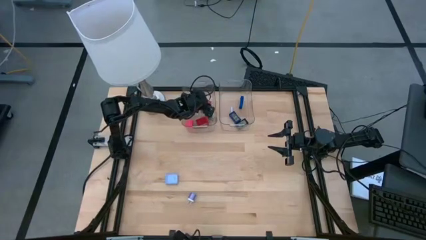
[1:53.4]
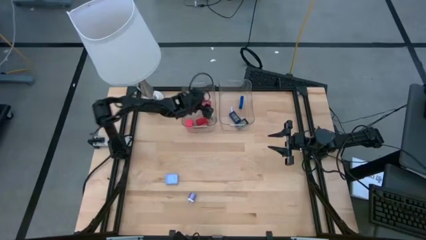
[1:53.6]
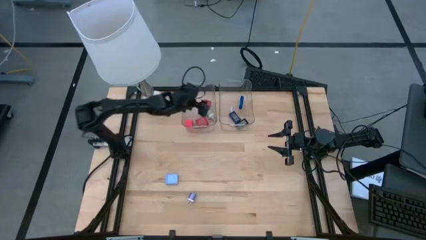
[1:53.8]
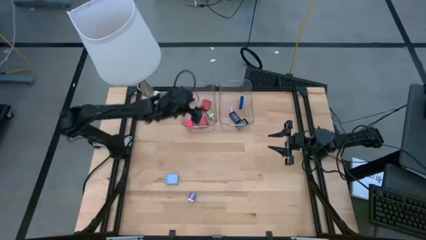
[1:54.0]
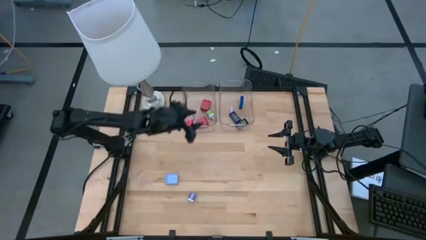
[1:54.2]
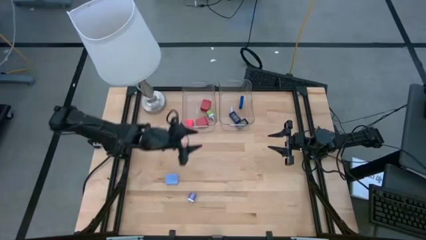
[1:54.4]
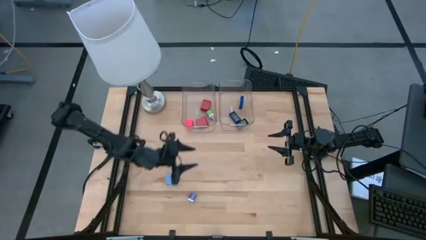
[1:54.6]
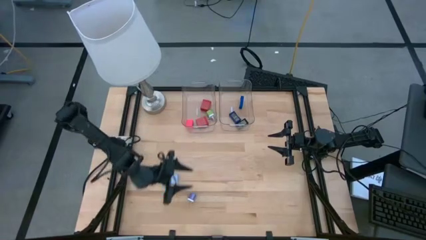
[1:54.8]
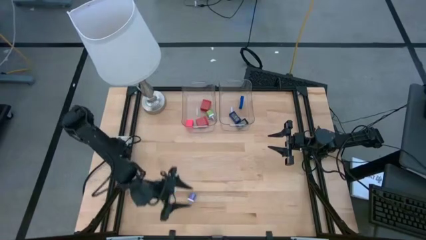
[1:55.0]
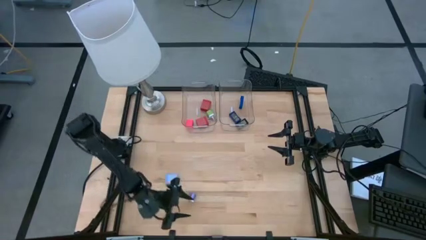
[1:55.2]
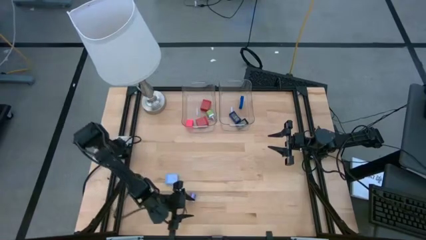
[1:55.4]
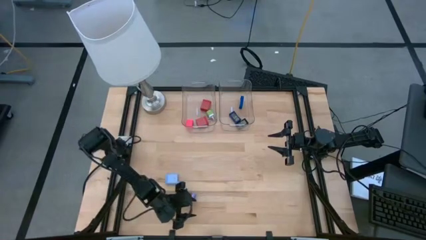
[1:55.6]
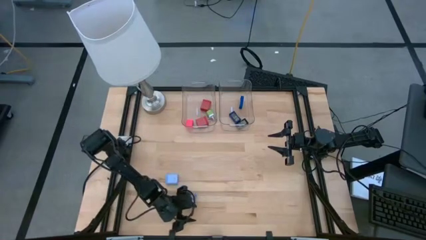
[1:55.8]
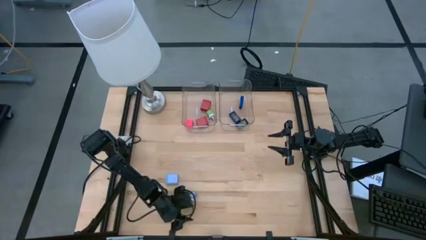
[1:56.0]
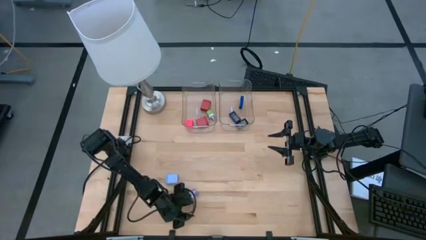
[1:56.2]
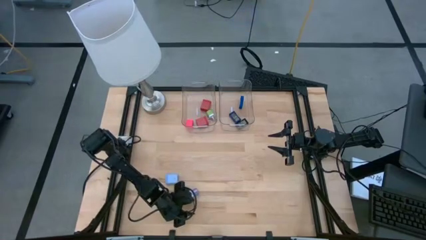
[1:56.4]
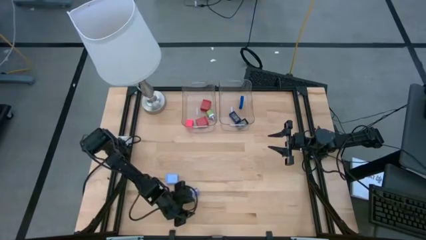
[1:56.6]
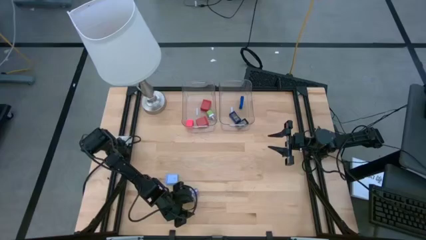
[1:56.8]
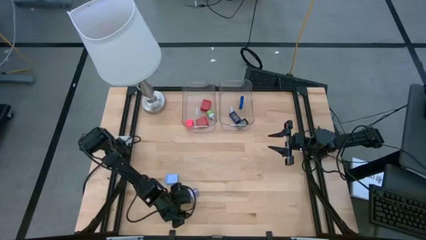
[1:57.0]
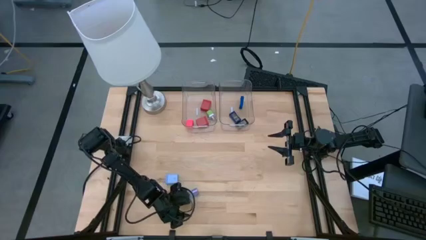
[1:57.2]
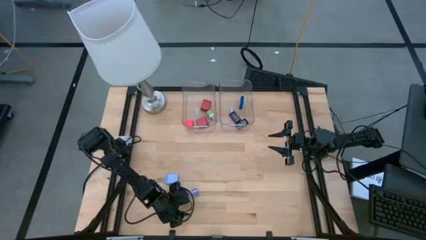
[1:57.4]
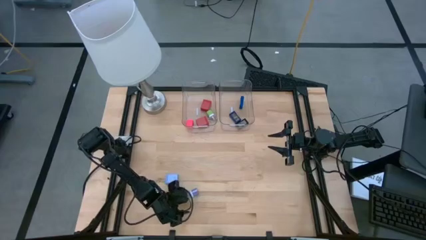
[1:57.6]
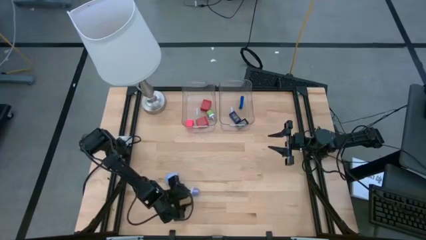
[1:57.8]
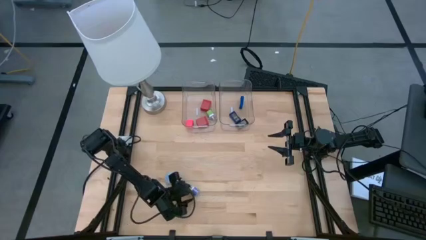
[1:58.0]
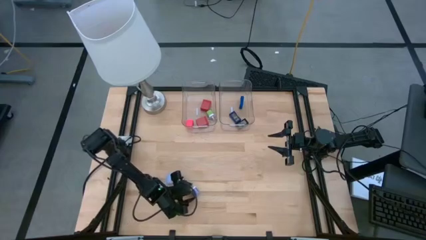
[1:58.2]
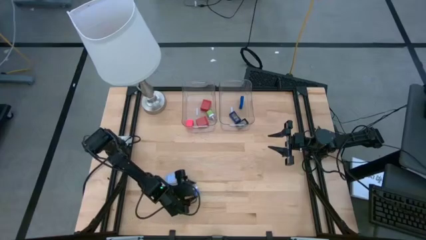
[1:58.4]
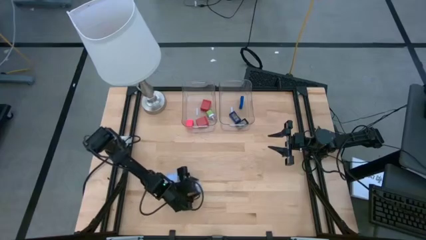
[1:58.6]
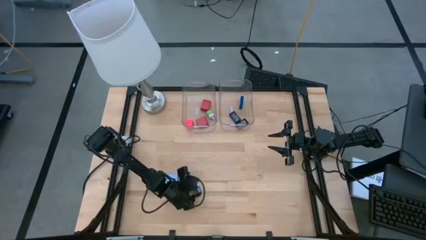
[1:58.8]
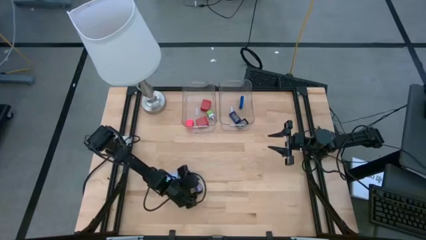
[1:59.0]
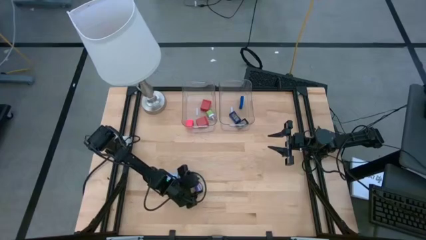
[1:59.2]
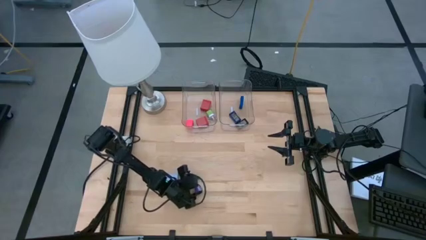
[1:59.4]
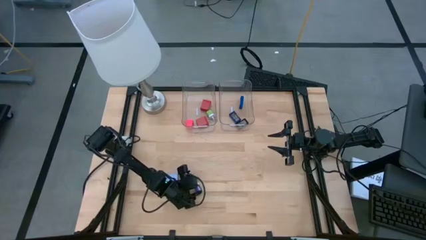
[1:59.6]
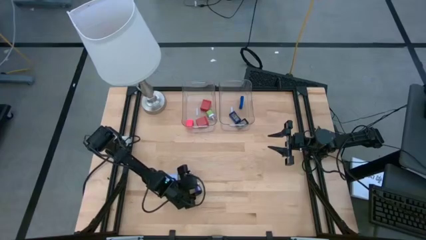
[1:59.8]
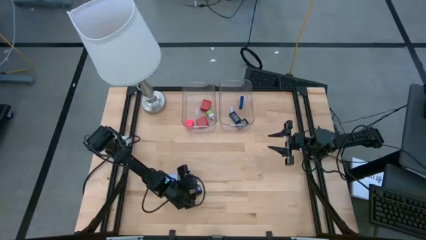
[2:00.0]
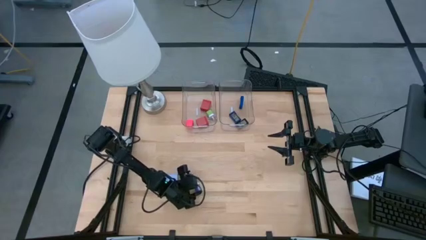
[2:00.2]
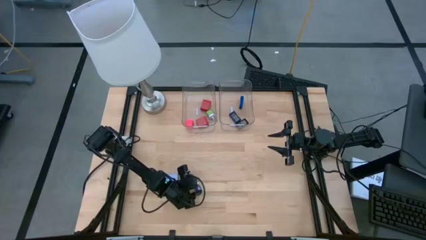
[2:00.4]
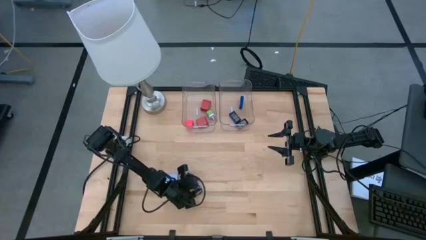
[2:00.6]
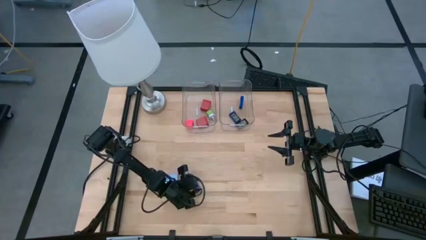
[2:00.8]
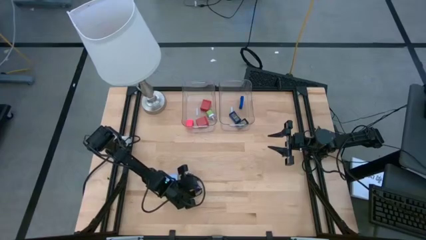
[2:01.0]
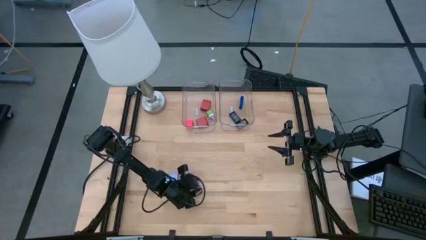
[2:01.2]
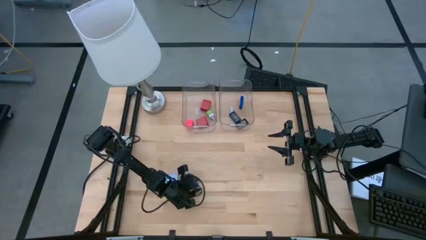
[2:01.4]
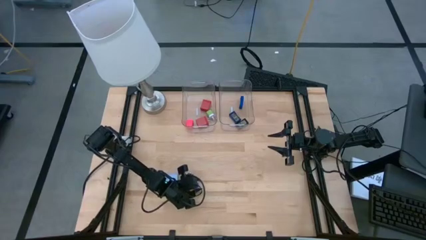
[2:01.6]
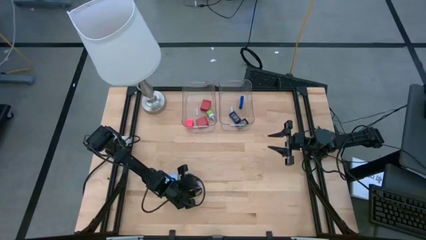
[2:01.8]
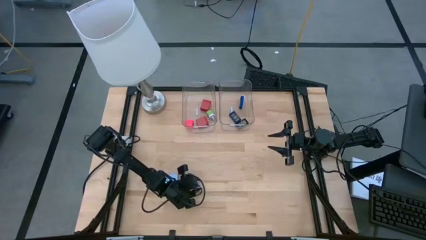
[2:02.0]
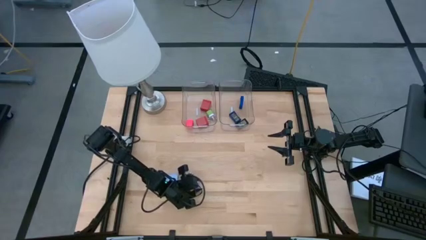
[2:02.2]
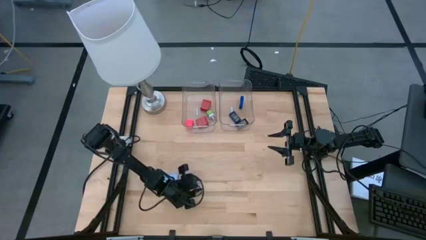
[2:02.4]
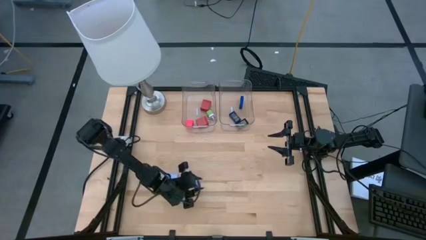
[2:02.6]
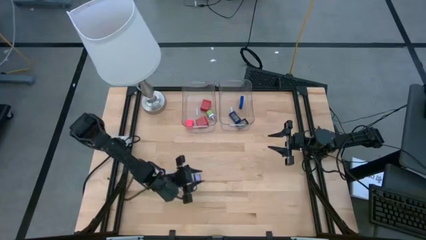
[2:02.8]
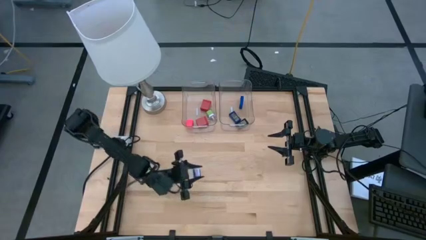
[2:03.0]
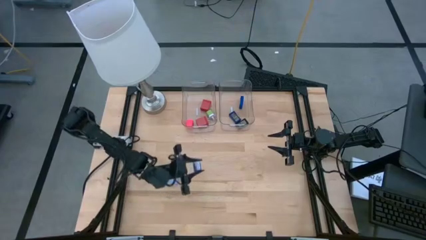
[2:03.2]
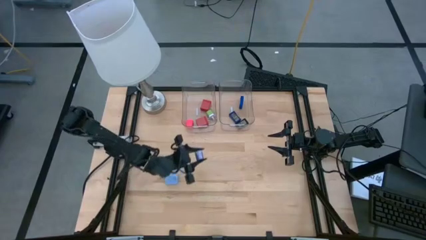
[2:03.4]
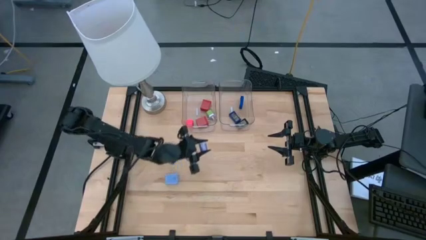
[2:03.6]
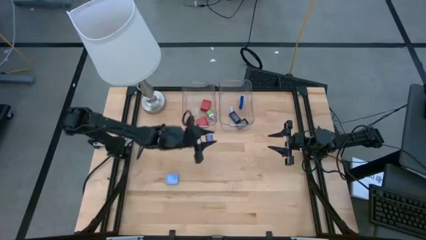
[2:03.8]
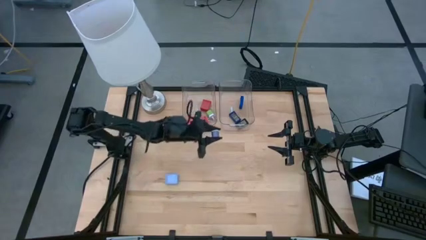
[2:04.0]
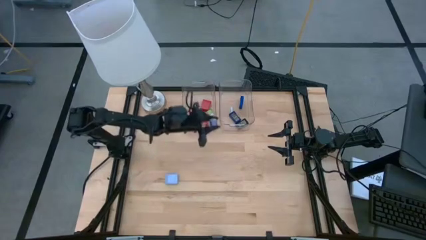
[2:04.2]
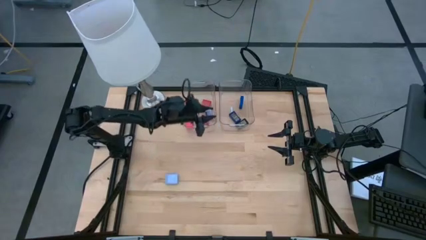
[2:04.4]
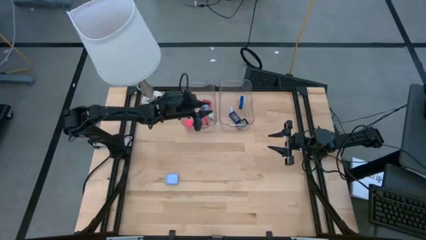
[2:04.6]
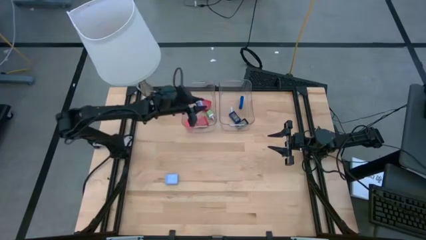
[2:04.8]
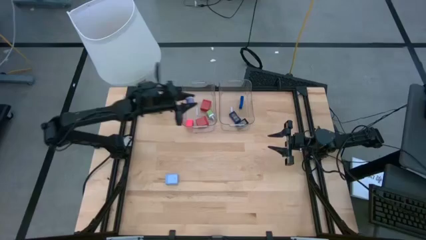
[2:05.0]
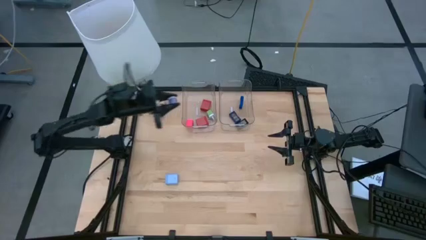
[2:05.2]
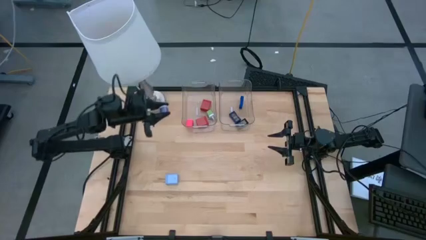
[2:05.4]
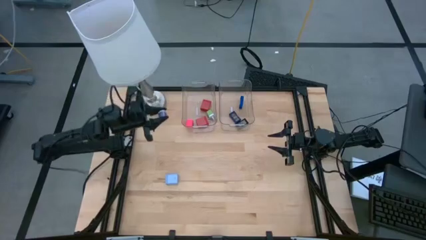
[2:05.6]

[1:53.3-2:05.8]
Task: Pick & Place Office items
Put the violet charger adapter into the left transparent bin

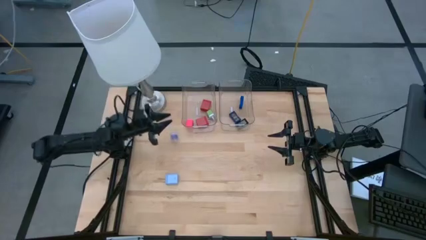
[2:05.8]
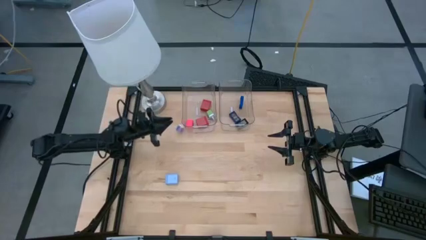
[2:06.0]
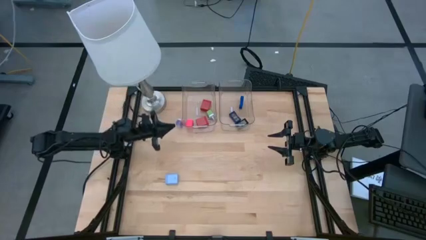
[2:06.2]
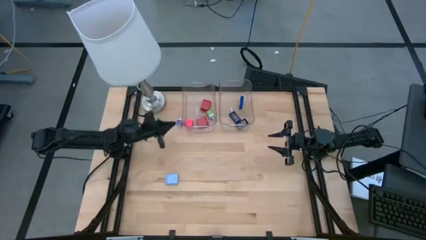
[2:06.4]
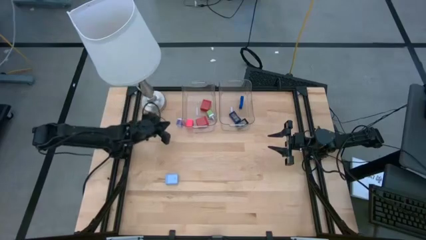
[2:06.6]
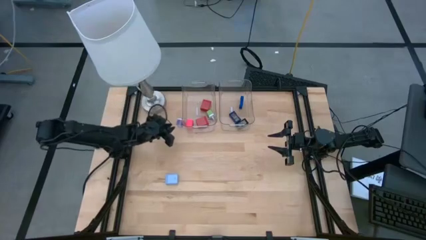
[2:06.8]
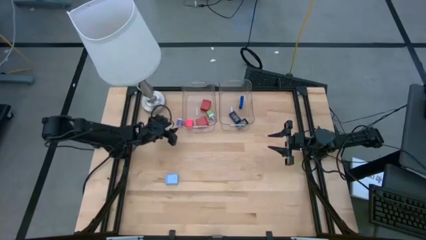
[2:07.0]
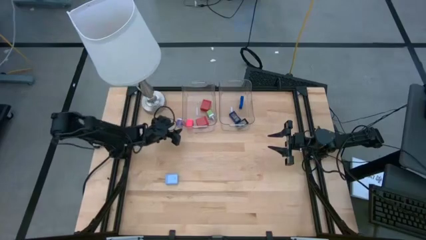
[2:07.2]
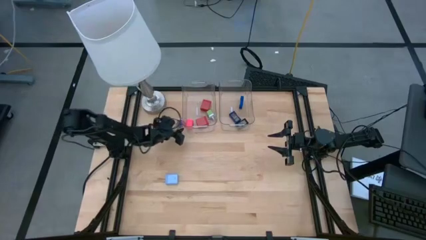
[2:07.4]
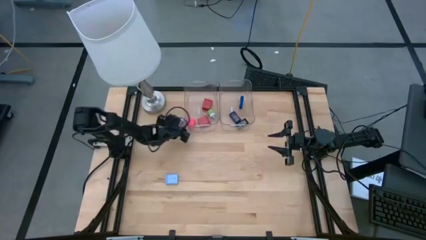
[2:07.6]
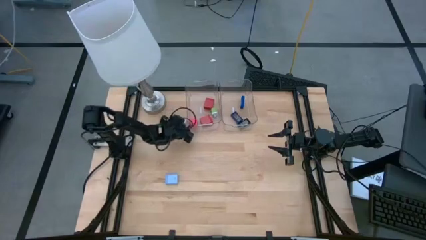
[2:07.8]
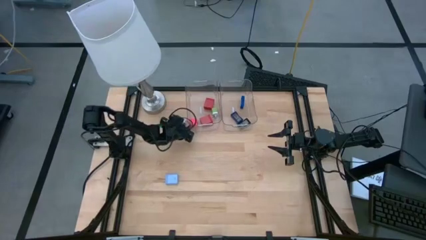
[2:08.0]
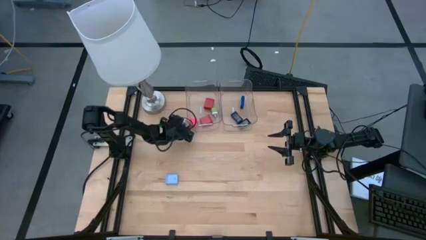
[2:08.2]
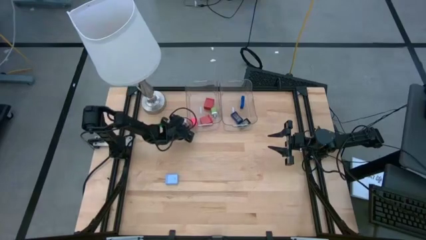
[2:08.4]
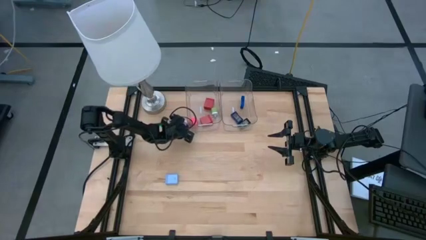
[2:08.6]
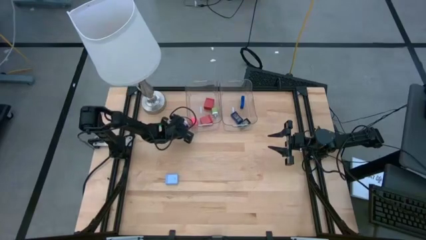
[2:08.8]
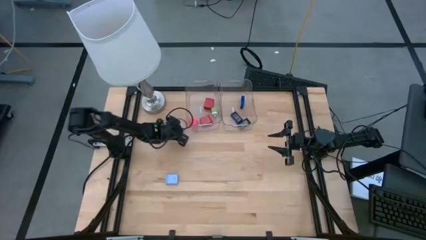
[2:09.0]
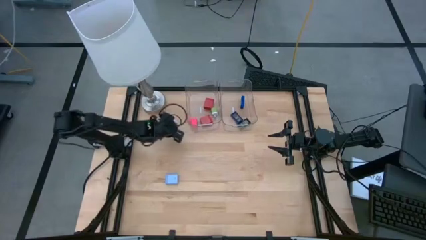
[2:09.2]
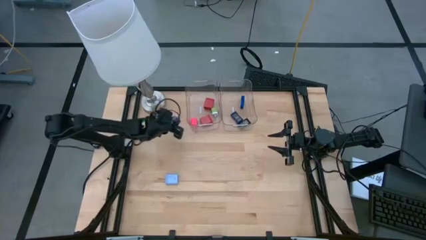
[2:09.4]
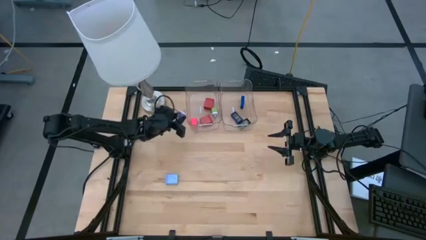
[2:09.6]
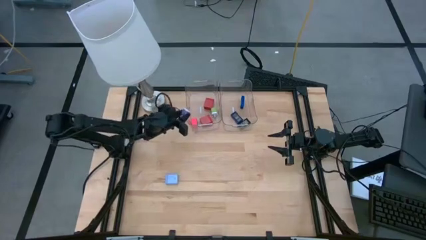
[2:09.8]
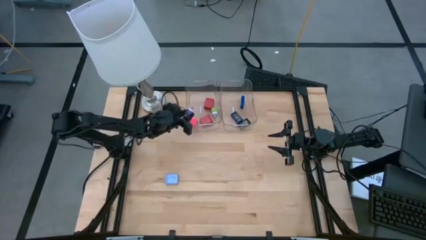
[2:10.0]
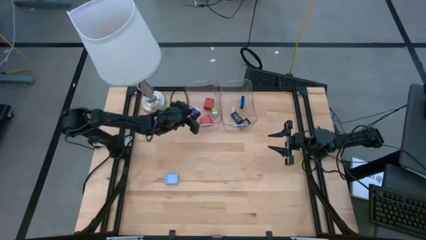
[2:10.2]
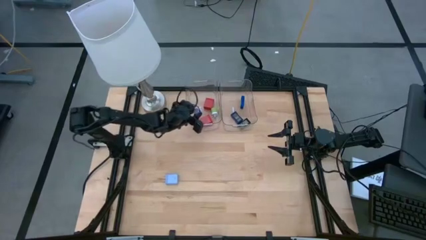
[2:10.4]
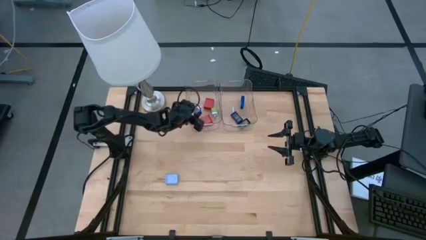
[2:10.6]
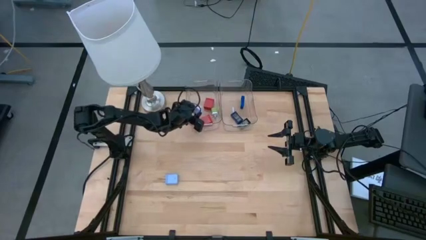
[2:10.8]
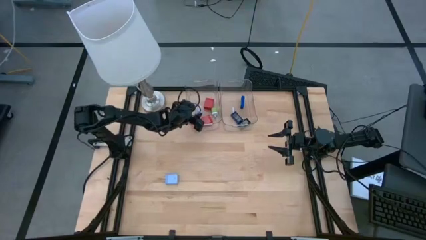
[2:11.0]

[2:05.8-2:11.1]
Put the violet charger adapter into the left transparent bin
